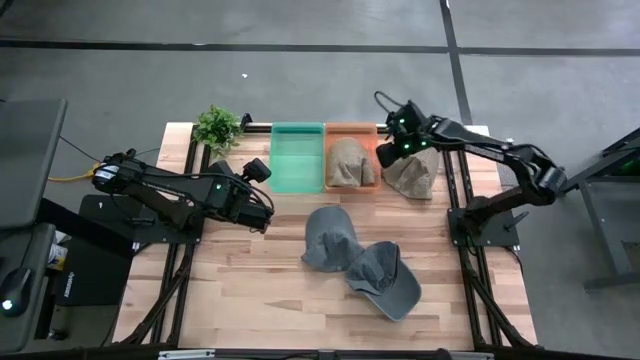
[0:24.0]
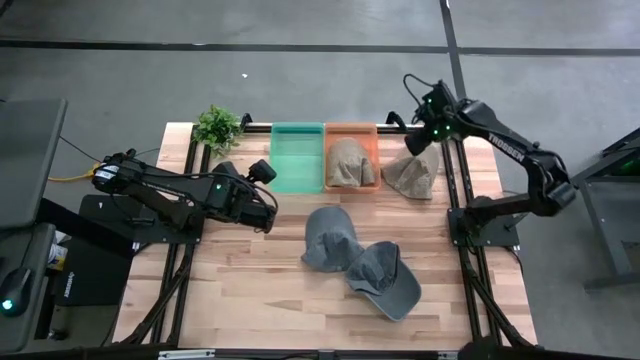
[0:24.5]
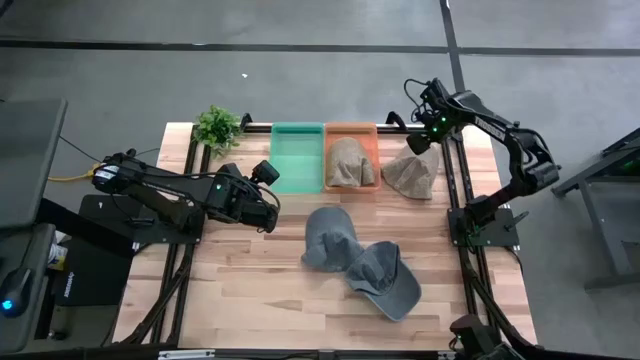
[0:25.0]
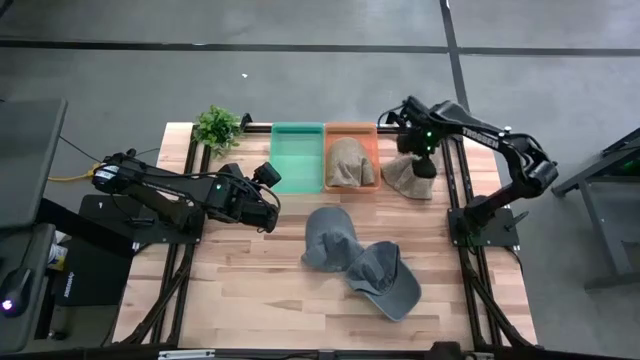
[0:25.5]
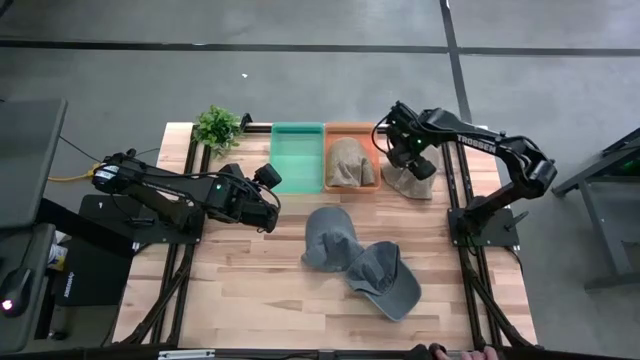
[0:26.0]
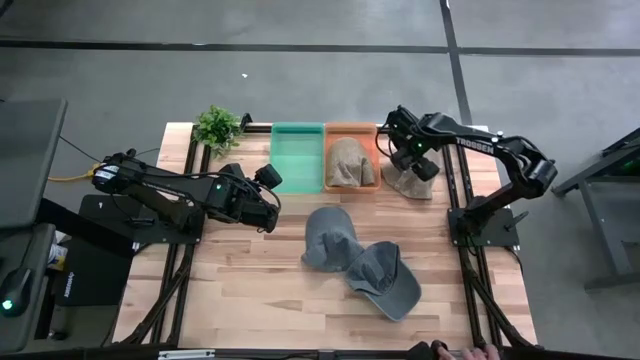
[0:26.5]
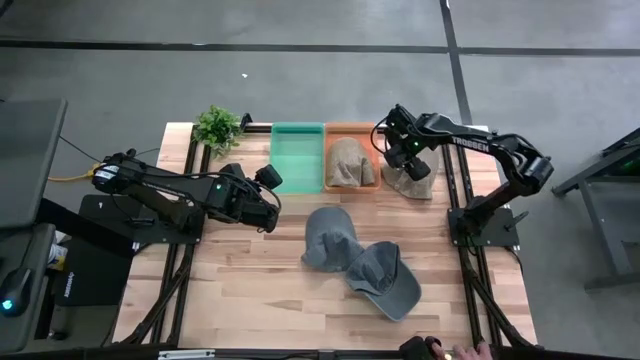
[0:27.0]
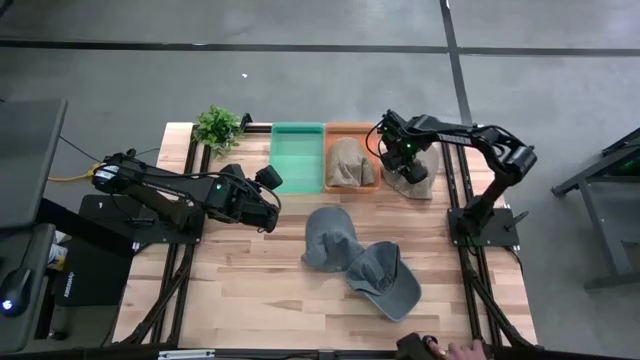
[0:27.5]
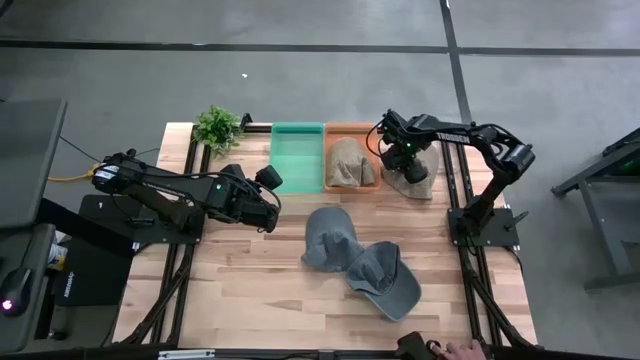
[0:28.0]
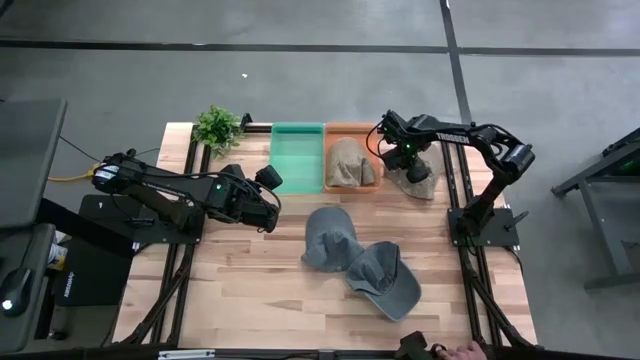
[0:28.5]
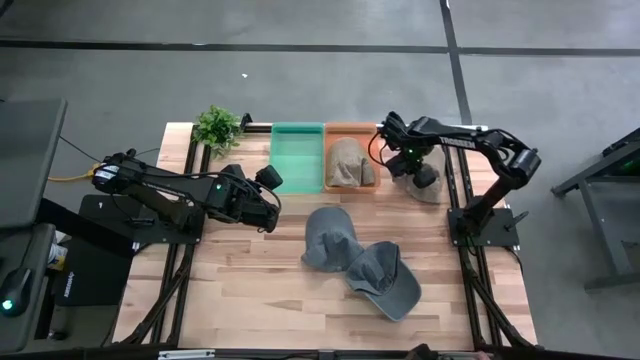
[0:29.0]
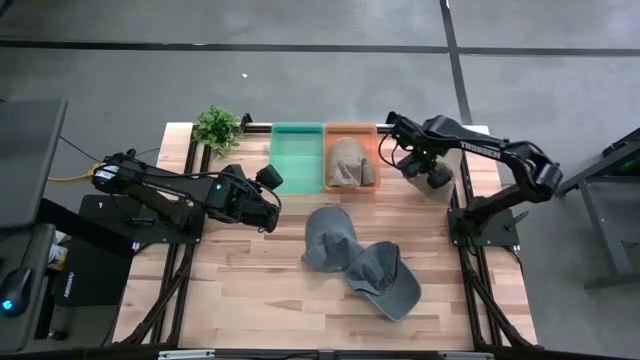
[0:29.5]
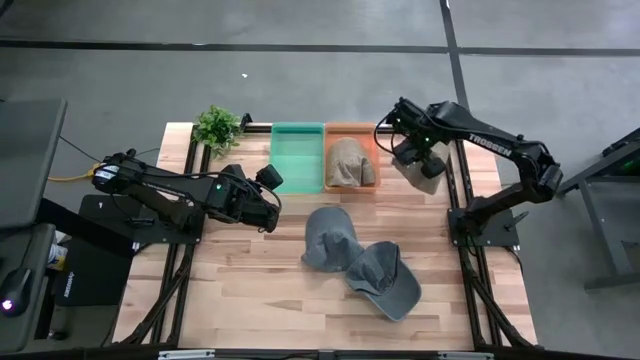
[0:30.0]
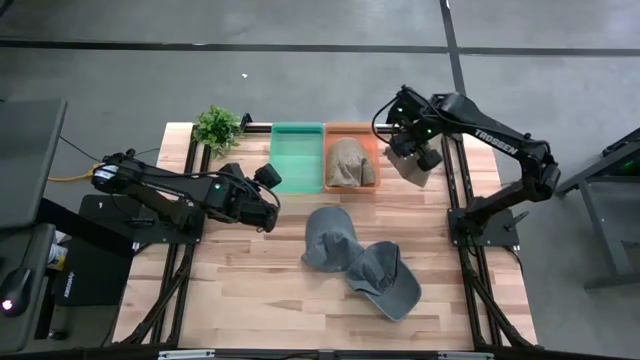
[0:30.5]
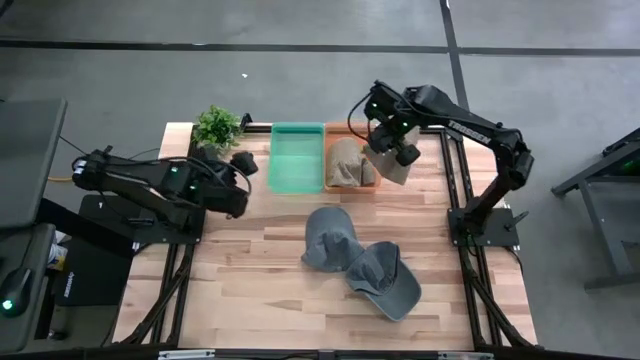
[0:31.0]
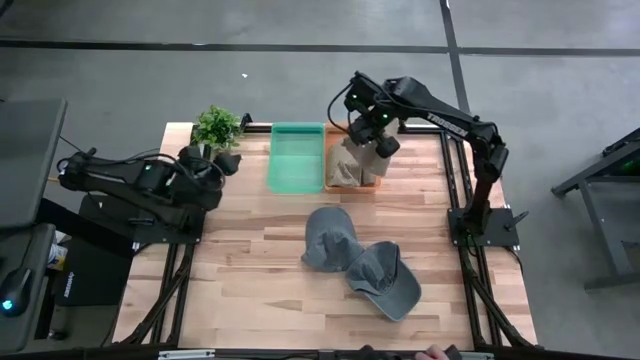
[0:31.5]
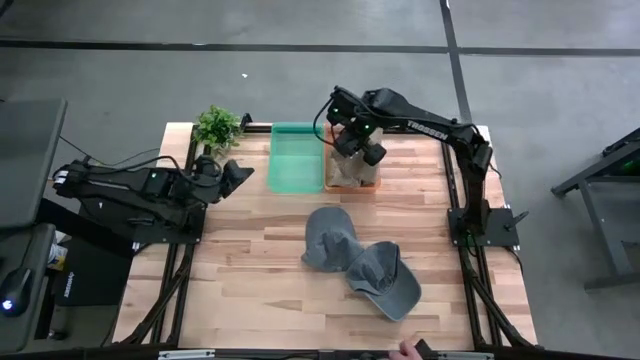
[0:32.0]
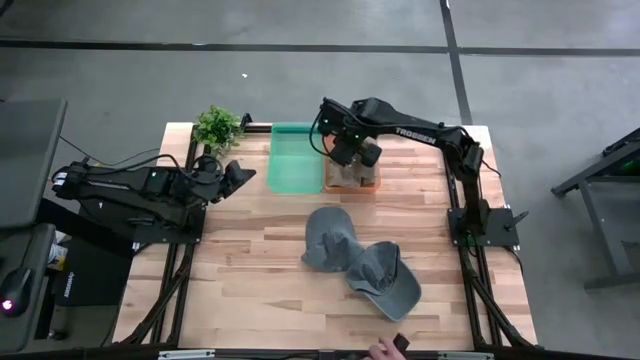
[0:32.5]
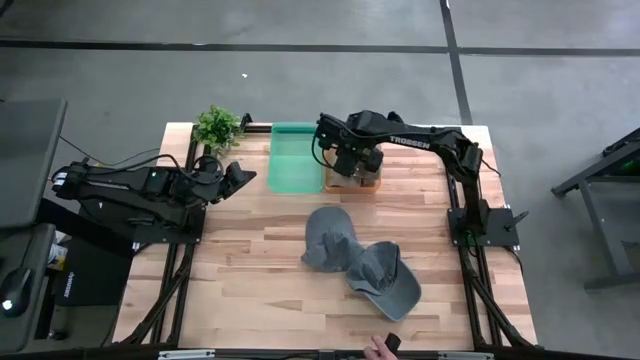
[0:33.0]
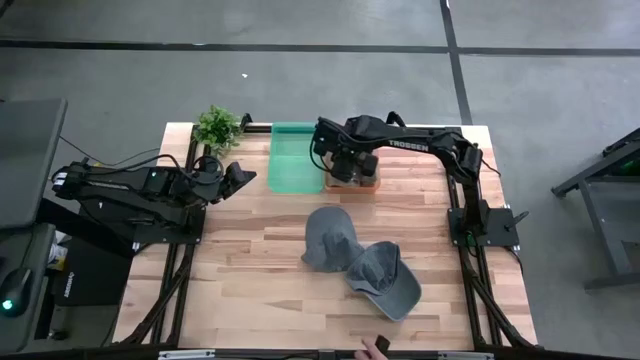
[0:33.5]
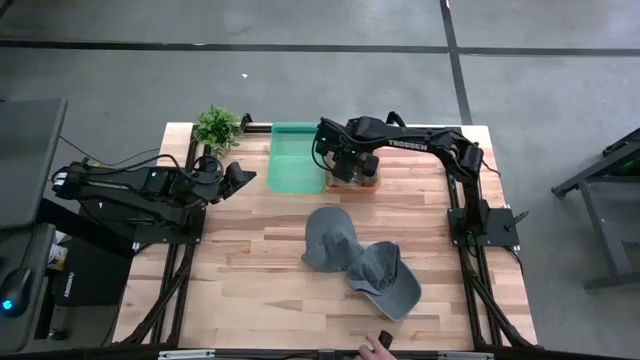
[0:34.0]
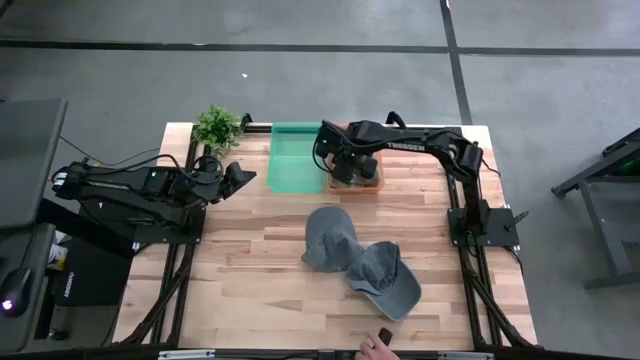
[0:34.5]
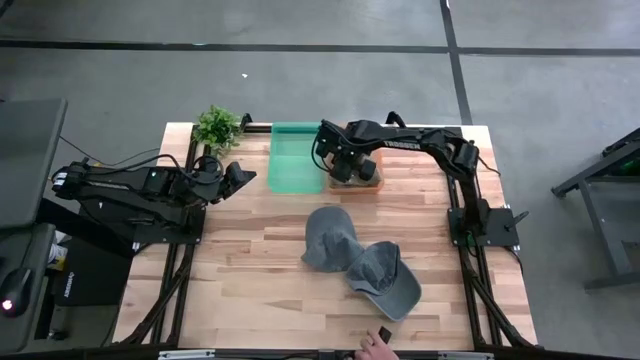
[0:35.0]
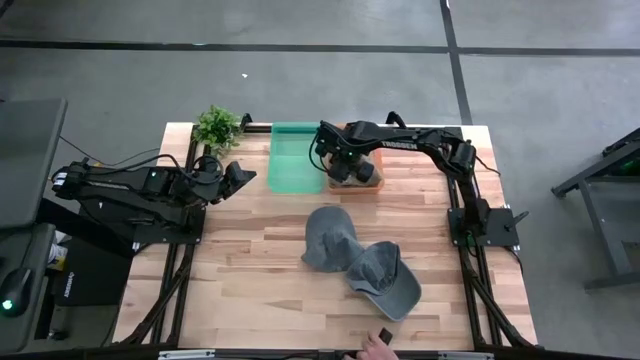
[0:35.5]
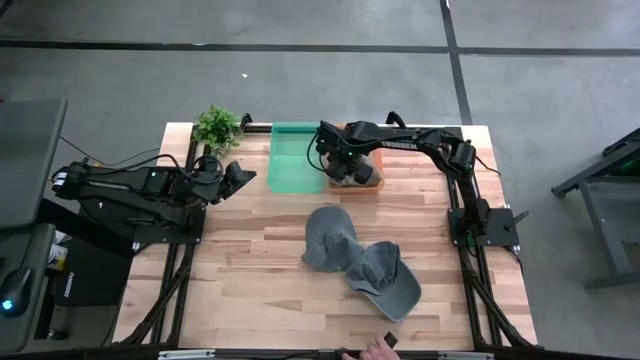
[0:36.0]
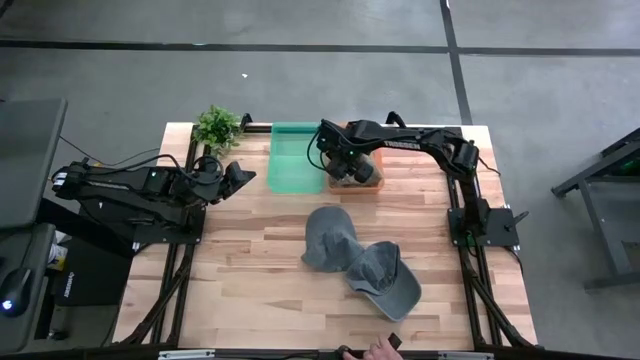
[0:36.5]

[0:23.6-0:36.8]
Task: Pick & Place hat
Put the brown cap into the orange bin

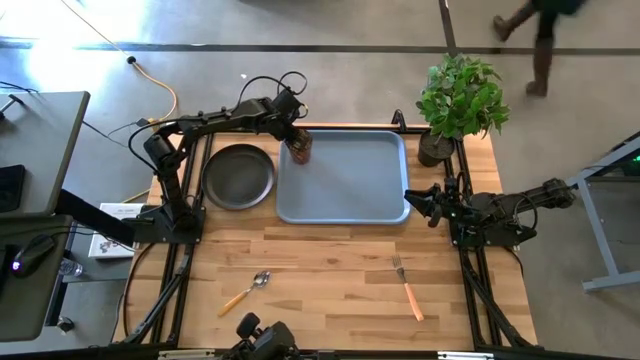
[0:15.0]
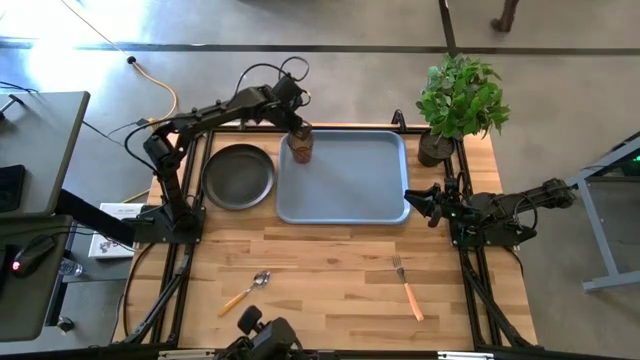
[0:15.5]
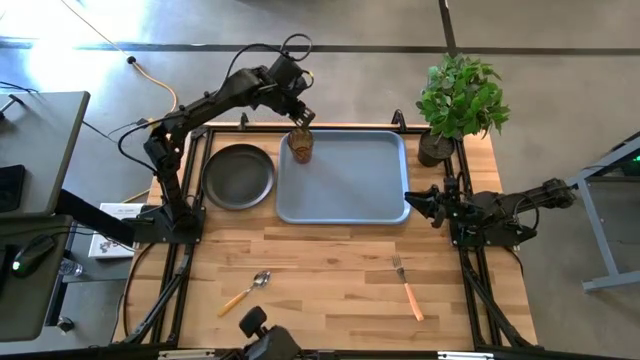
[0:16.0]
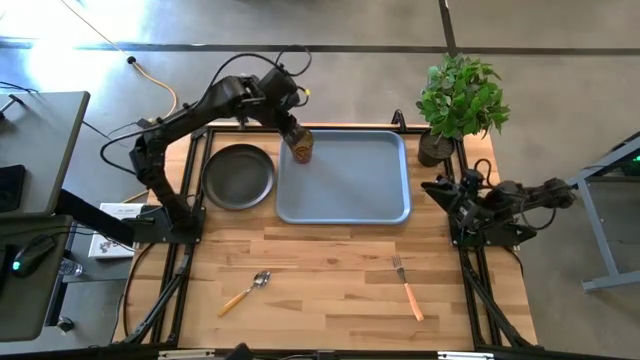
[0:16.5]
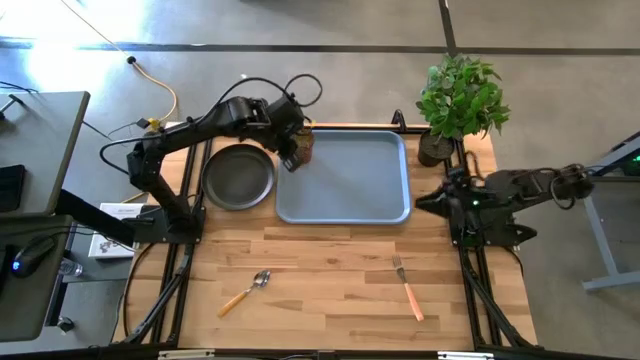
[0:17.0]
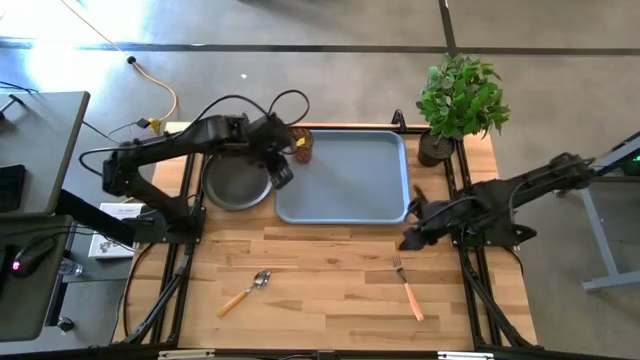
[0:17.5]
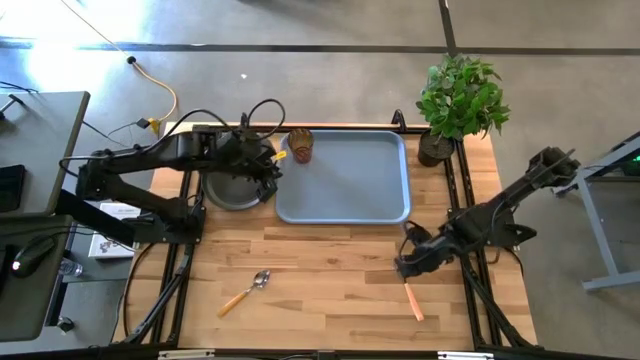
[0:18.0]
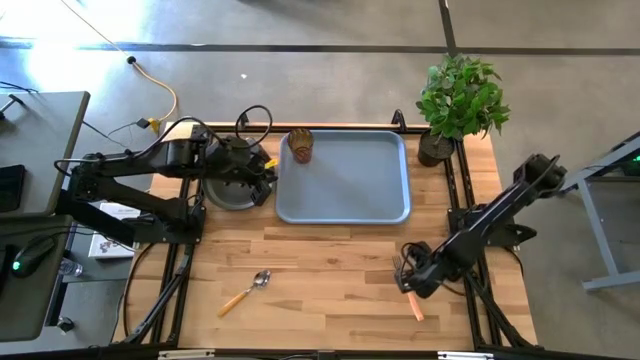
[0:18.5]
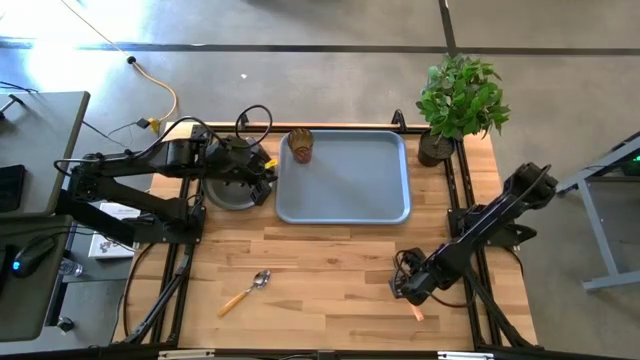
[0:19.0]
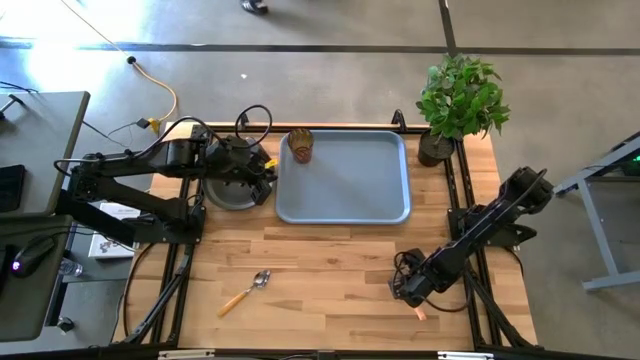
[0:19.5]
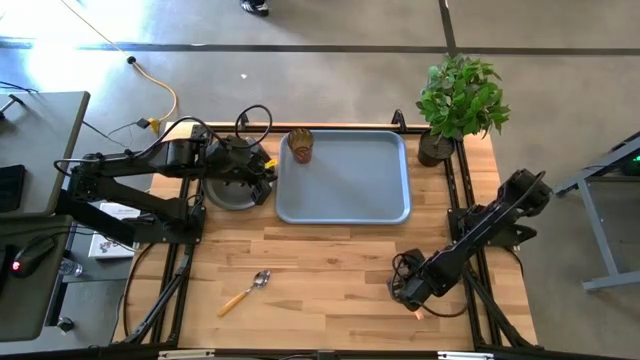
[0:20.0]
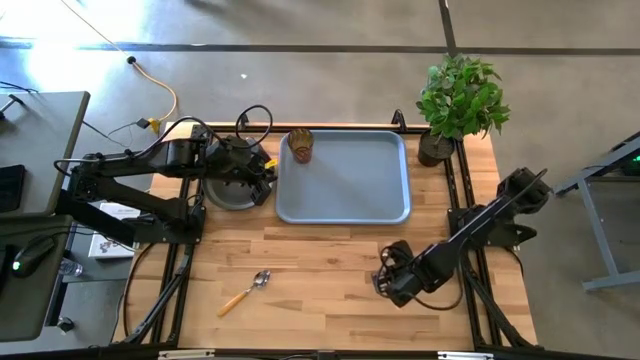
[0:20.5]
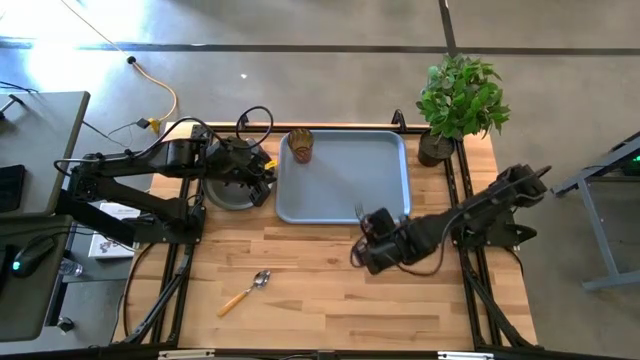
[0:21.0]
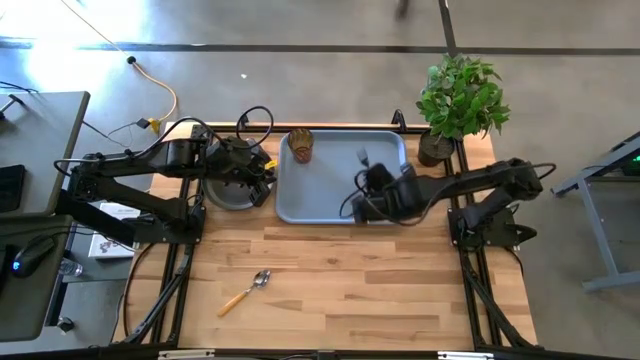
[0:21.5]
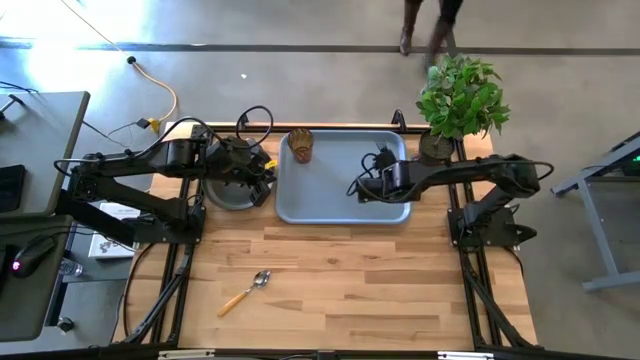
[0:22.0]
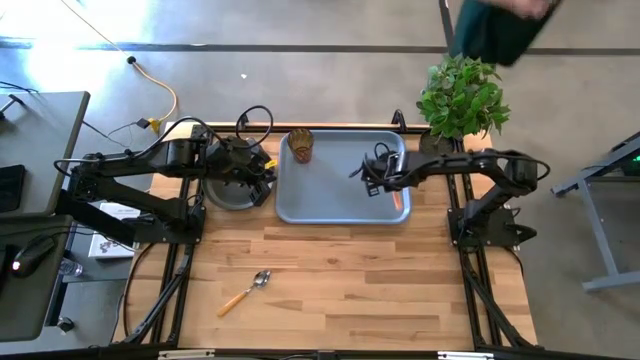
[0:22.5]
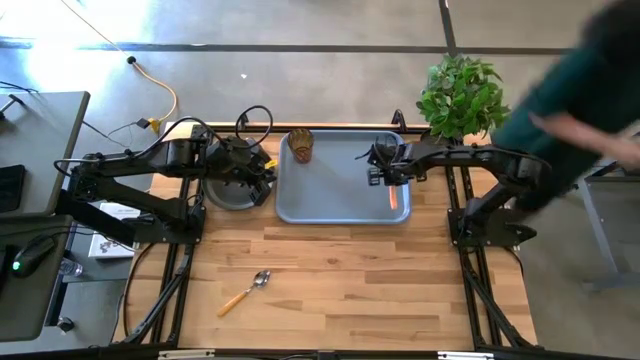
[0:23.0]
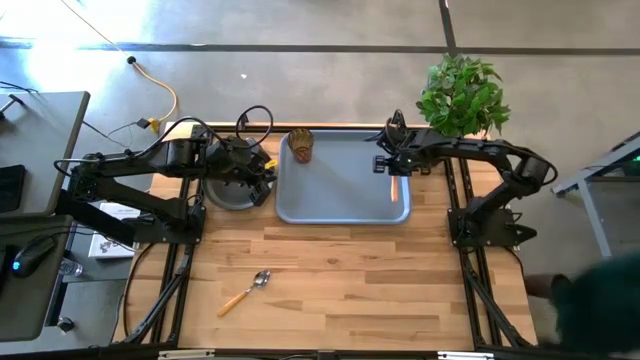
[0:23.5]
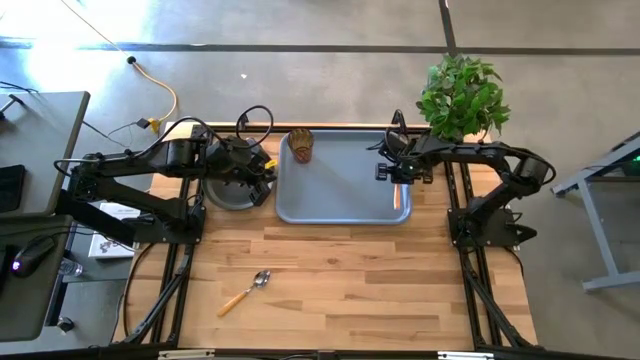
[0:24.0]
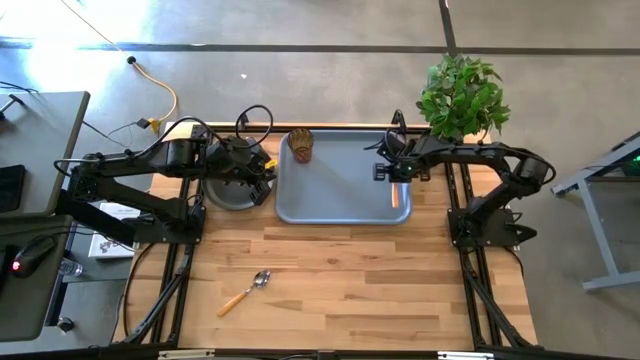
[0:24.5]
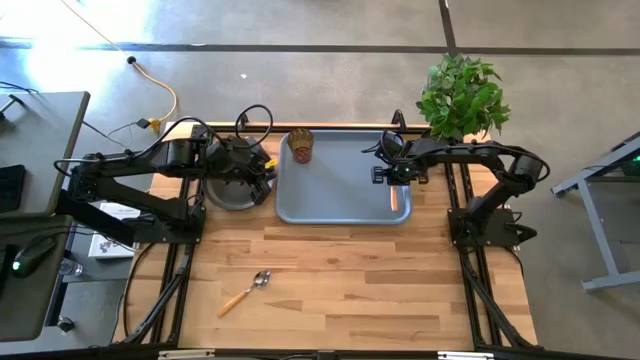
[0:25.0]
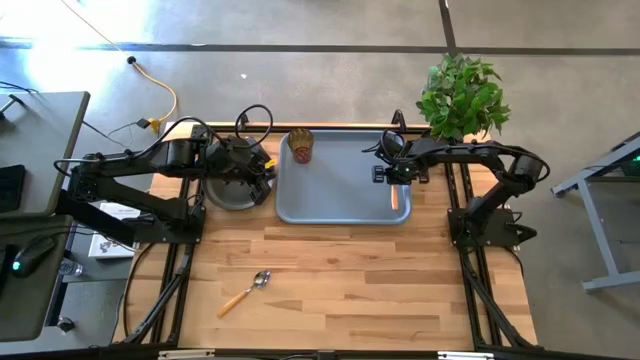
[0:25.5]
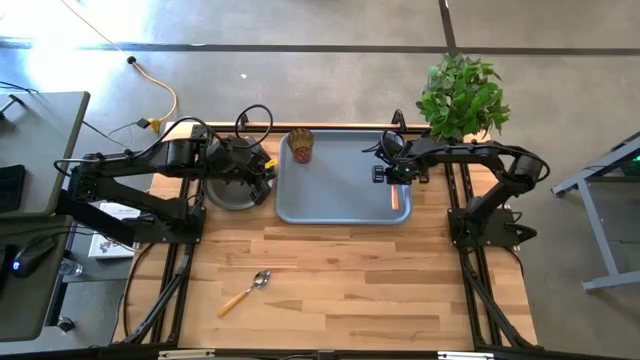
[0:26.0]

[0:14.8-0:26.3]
Task: Pick and place plate/cup/fork/spoon on tray
Put the orange fork on the gray serving tray
